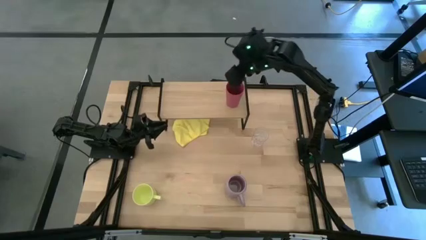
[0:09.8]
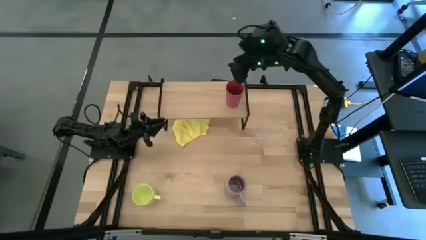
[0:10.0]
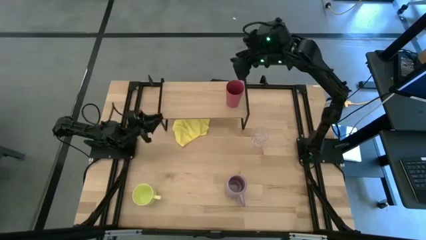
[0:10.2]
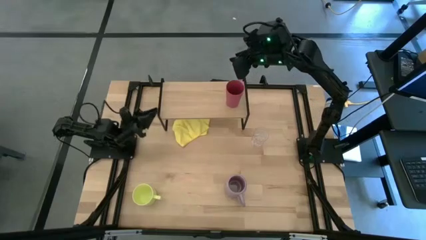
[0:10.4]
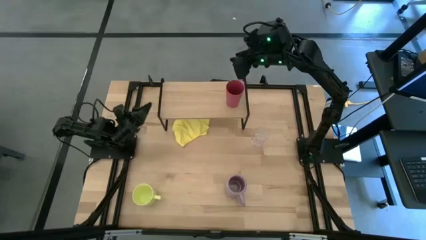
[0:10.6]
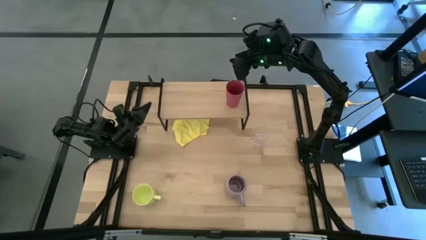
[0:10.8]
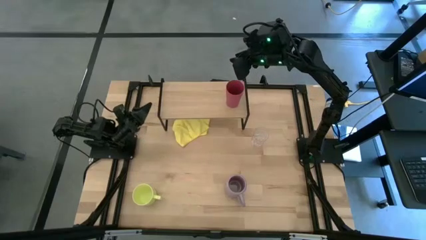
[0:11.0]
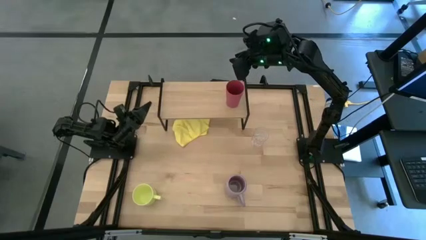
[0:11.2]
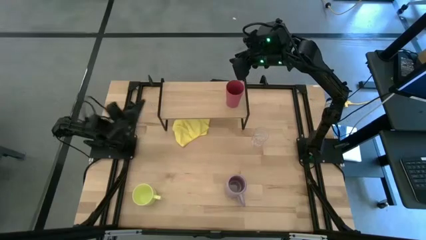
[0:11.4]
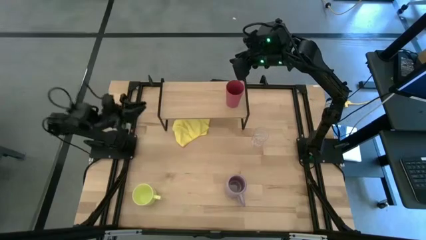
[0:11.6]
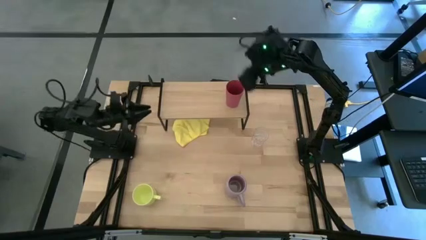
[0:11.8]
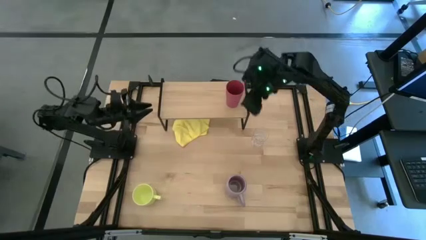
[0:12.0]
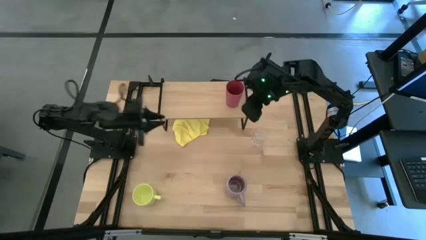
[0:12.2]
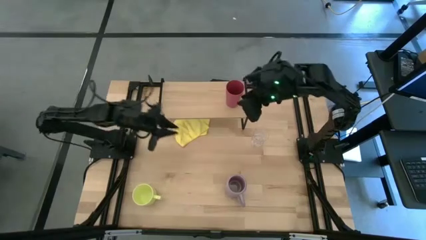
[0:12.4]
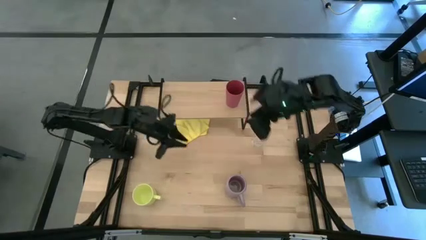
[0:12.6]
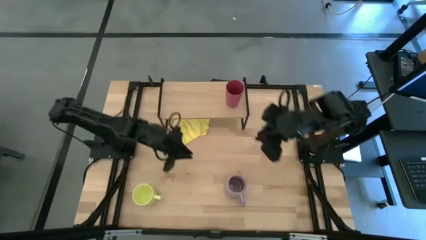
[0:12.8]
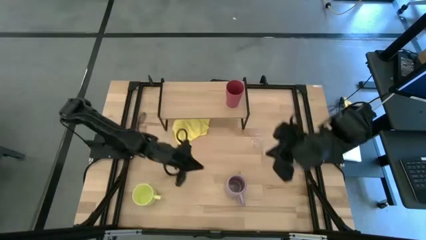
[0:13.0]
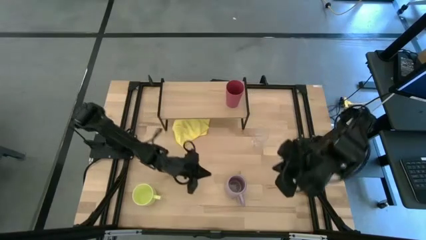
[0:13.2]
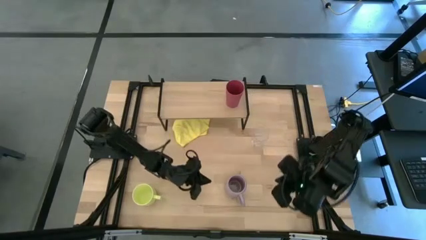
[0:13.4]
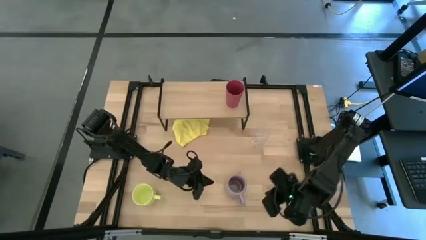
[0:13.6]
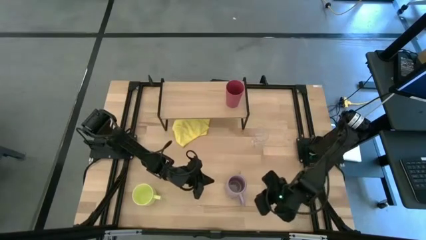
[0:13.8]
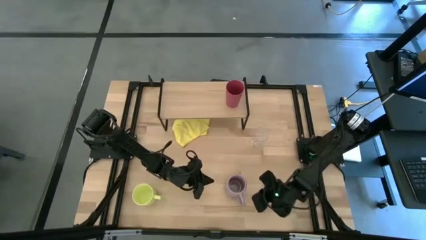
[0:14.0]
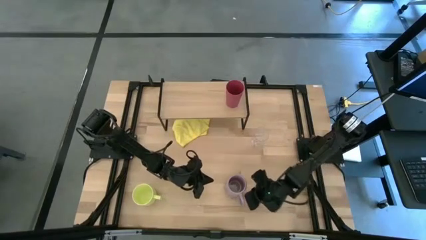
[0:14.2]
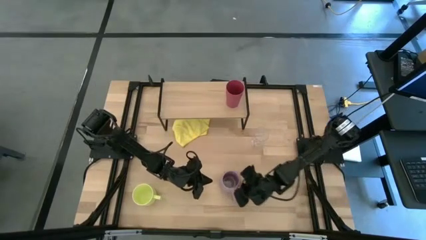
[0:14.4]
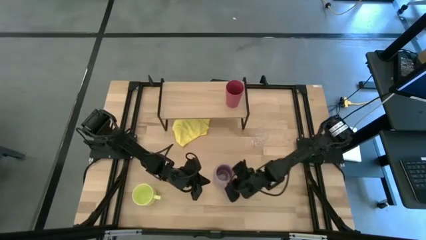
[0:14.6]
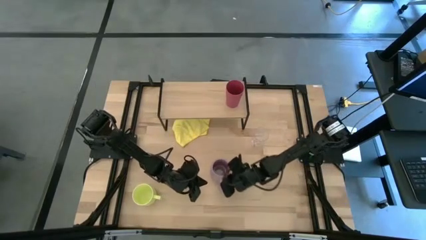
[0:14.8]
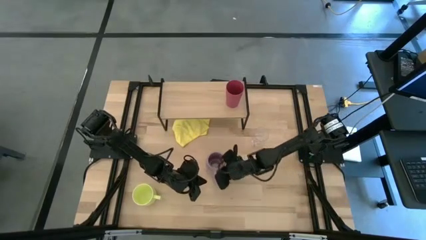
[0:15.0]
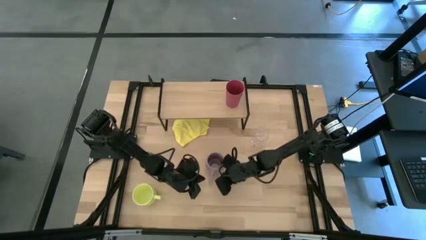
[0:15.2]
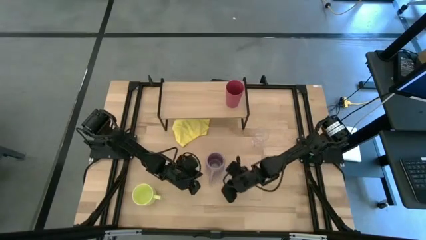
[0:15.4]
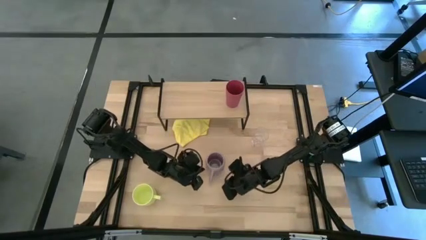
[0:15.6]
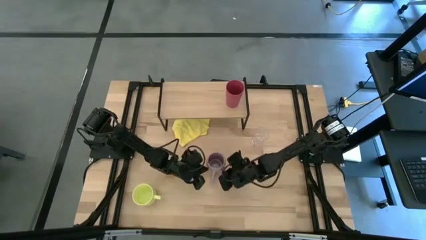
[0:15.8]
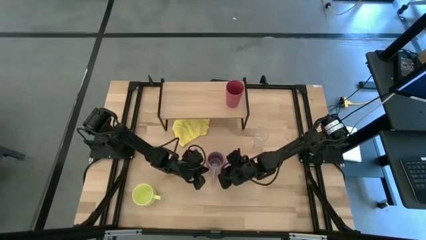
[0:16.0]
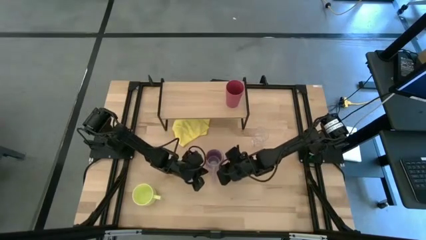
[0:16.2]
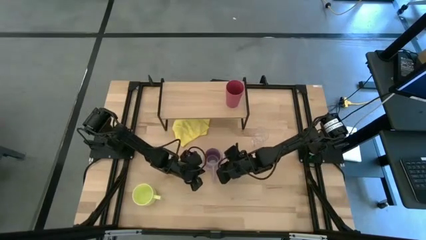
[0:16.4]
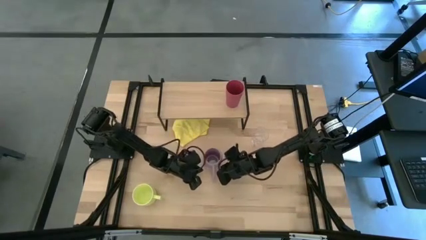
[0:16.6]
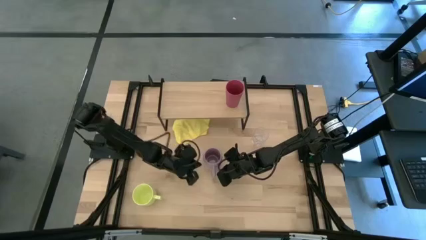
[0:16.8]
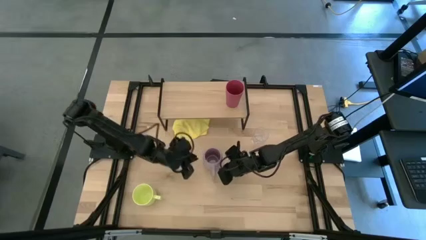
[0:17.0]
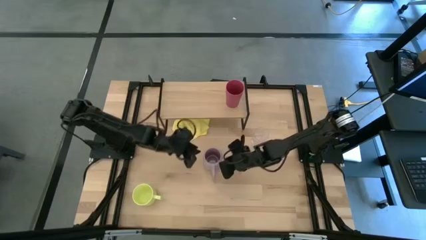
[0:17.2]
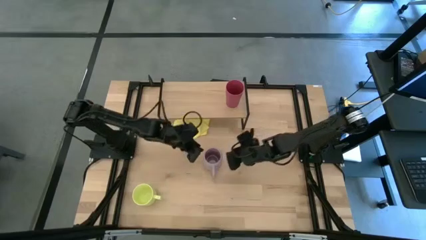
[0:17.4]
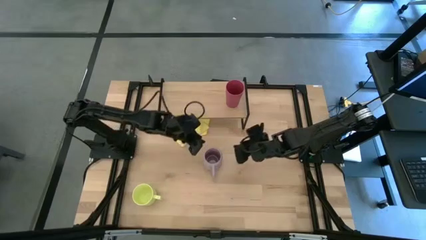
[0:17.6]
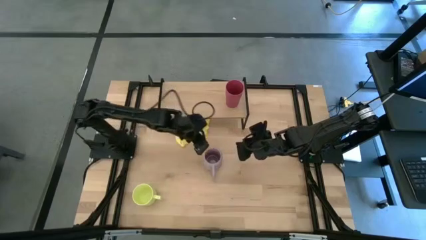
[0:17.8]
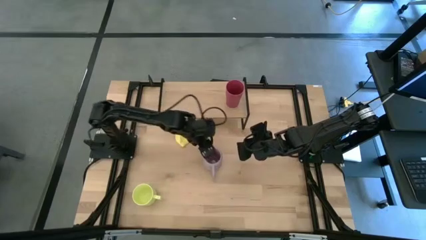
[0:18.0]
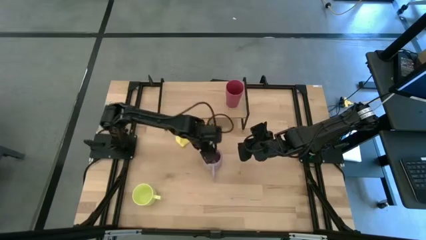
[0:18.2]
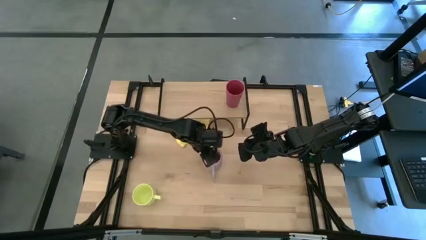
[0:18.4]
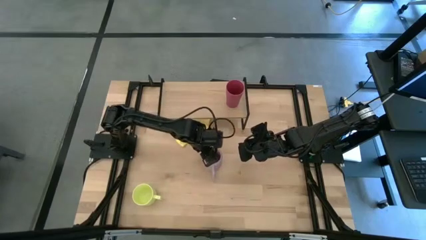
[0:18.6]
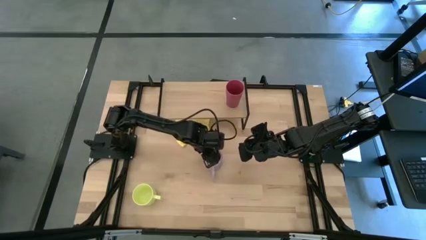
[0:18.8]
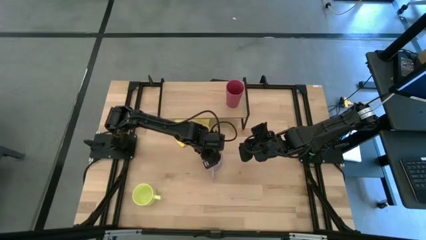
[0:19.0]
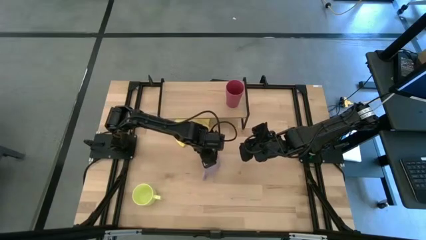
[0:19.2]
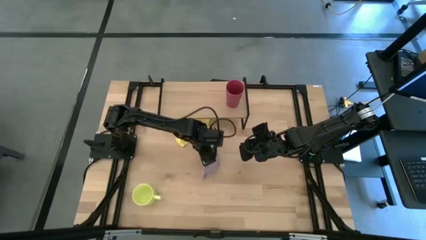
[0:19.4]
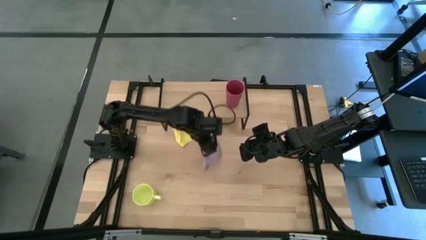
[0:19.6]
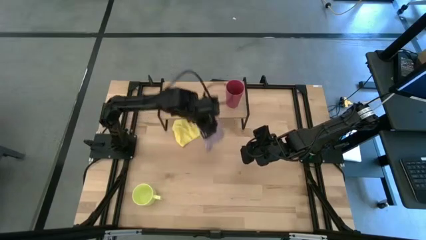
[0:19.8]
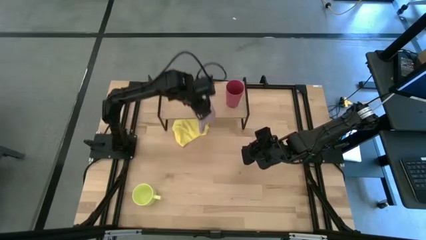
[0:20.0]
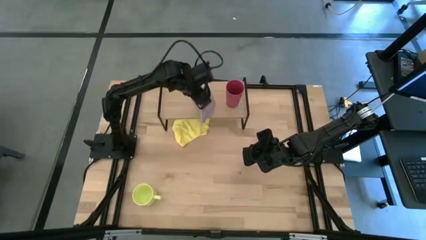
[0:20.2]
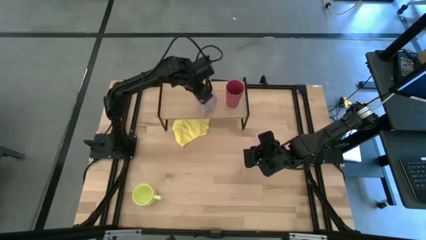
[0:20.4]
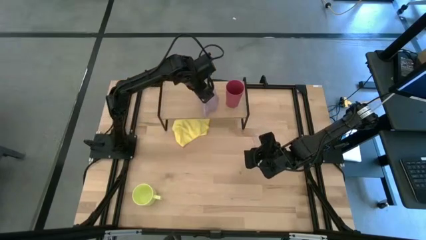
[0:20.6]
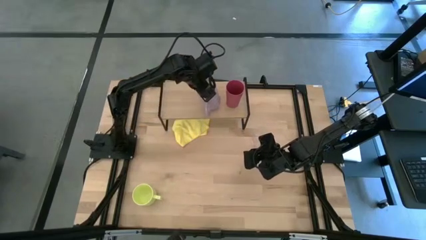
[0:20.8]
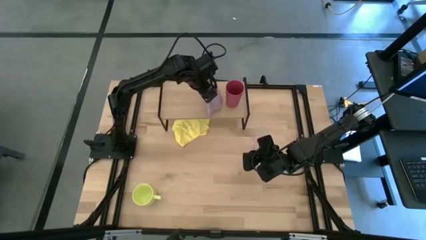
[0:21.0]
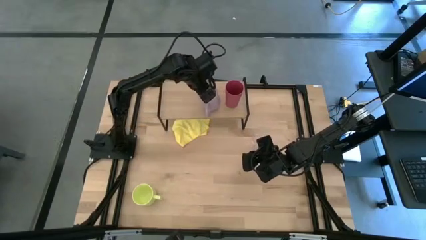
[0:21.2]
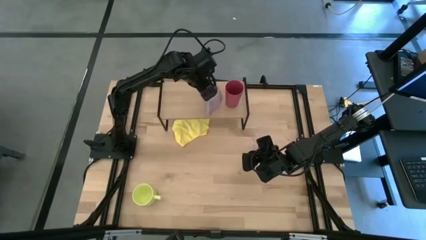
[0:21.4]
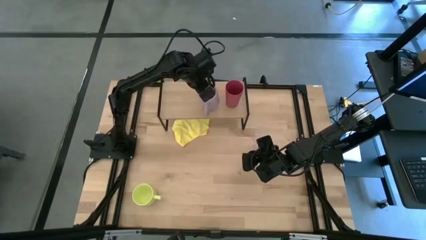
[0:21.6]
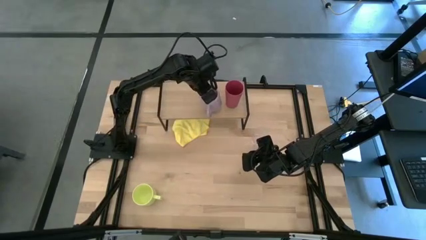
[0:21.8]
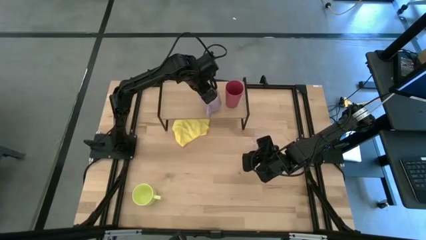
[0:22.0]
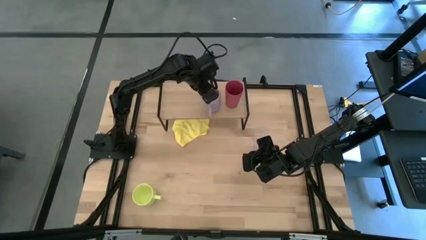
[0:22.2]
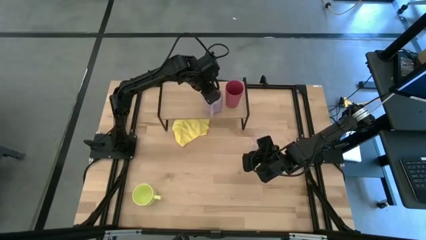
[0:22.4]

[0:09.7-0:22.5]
Task: Stack small to large cups/mugs on shelf
Put the violet mug on the shelf
